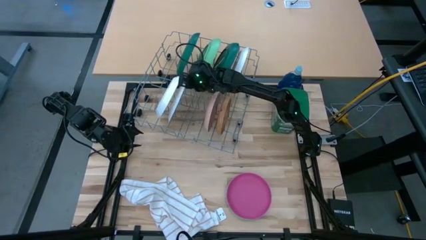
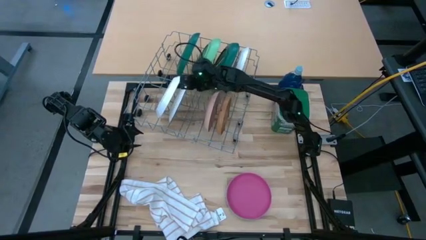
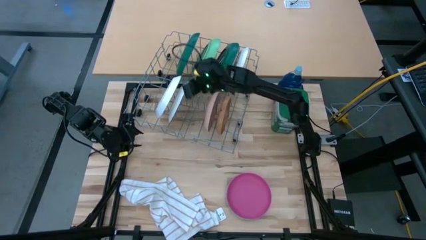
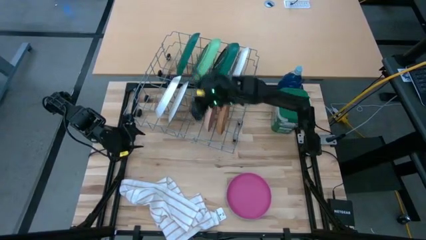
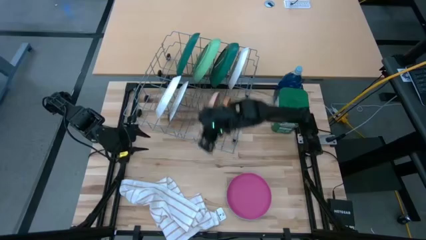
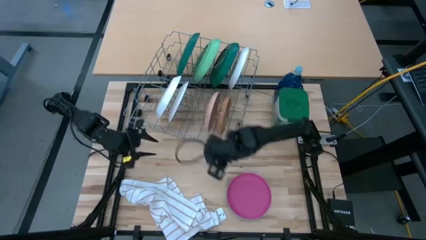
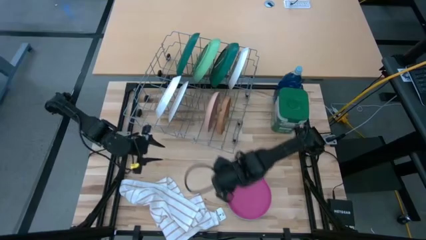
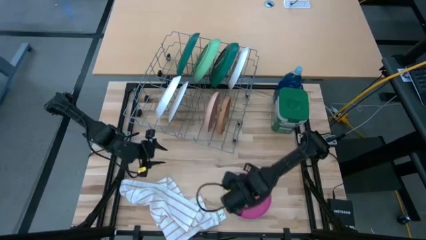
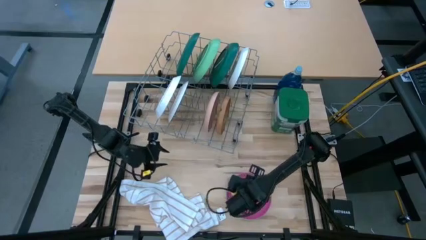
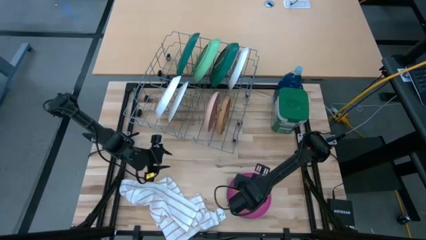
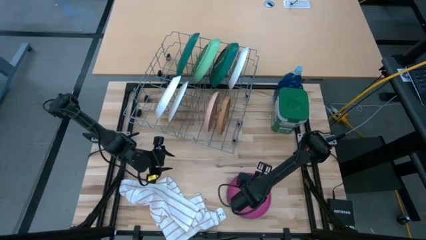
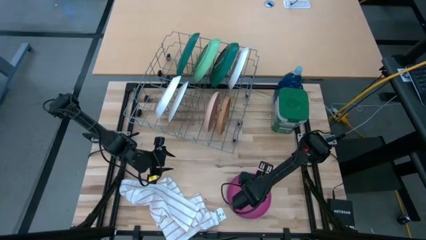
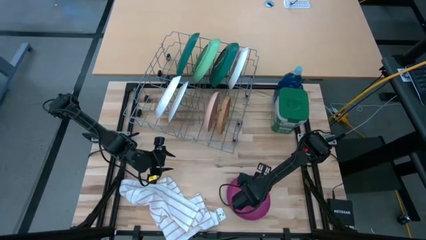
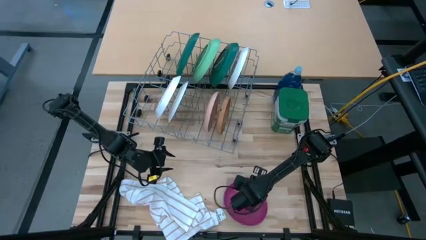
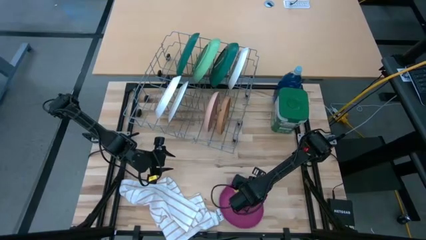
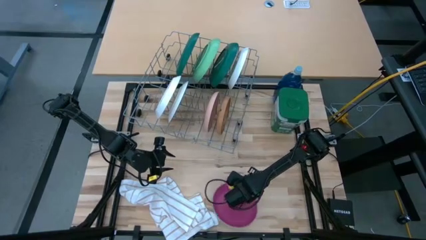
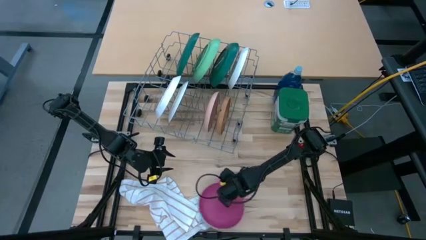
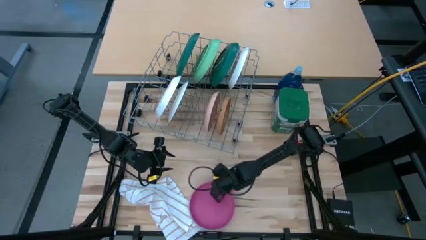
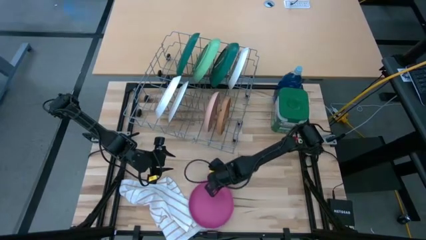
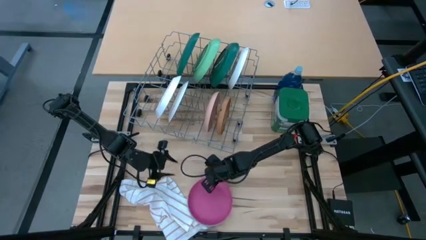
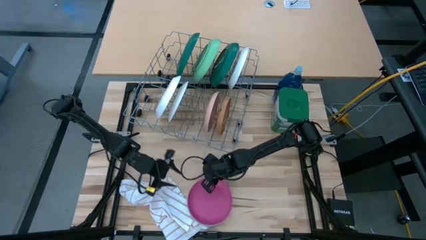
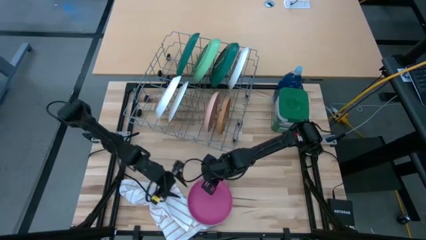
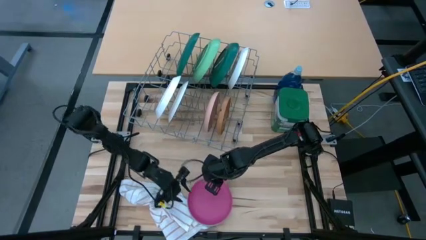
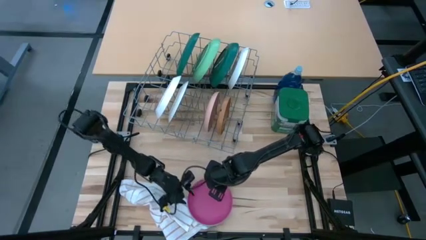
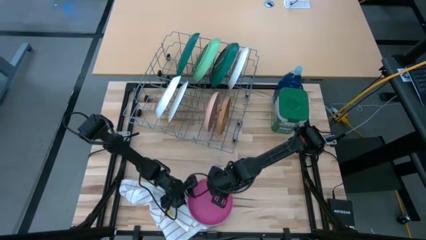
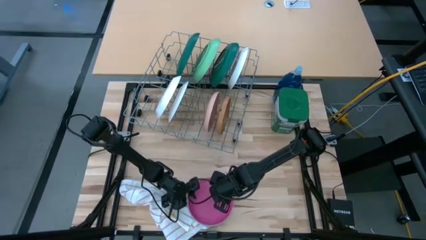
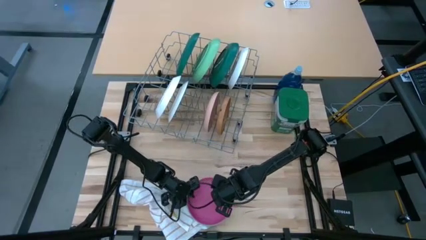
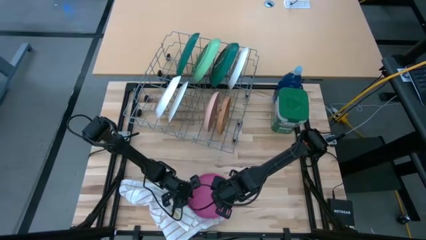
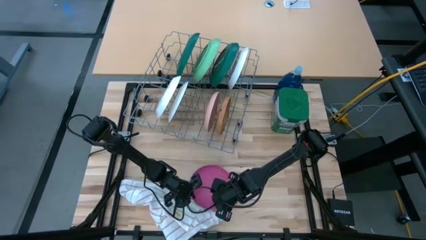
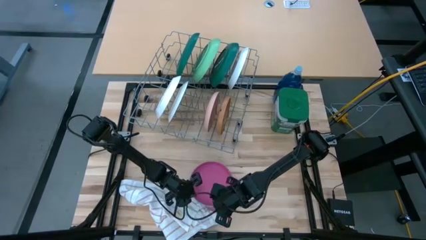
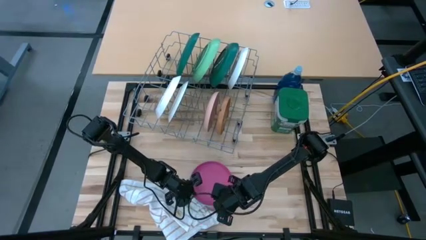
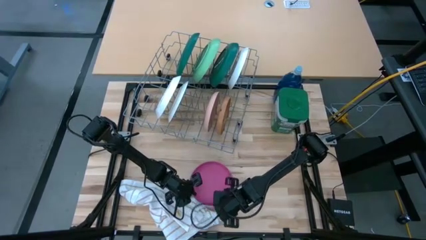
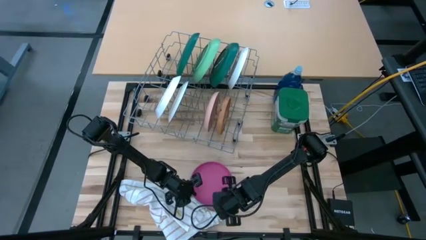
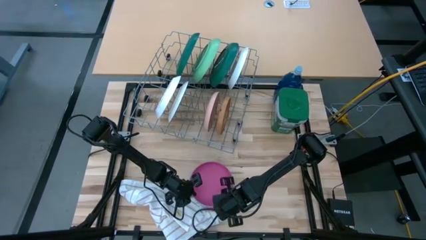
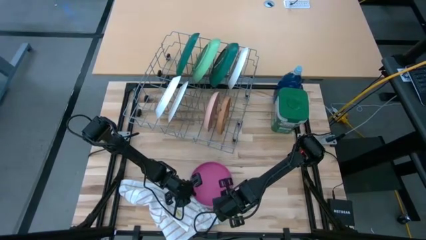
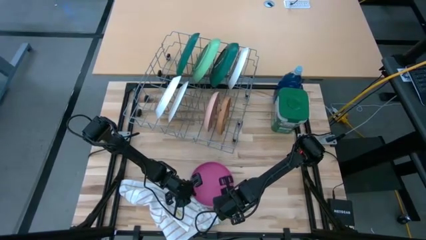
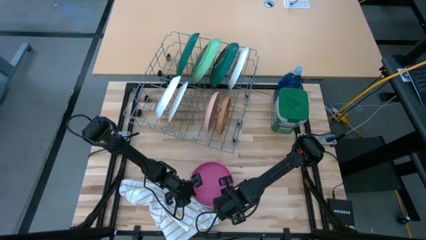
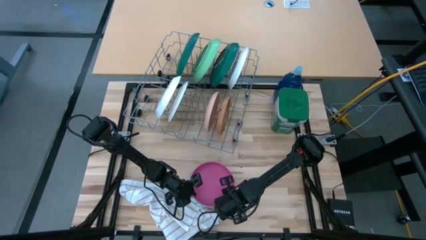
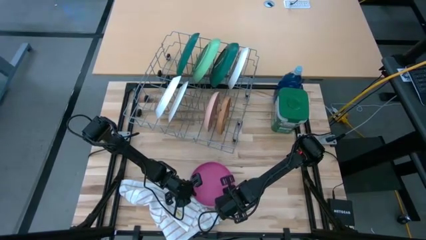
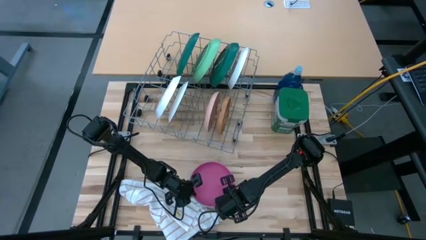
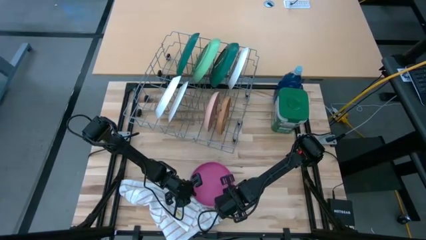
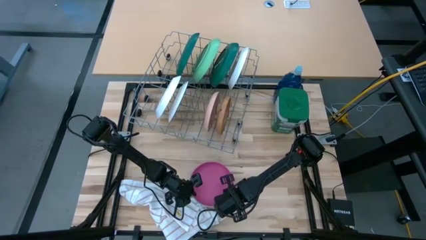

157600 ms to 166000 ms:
Task: Sort dishes
Put the pink plate in the dish rack

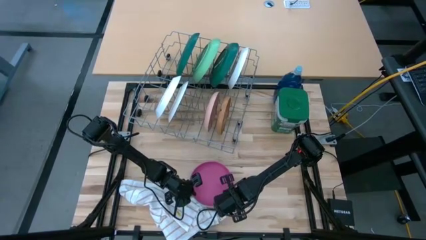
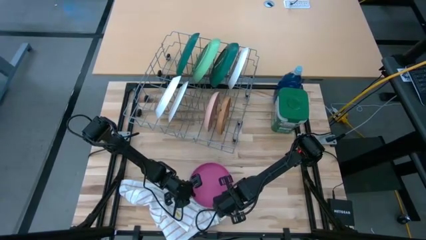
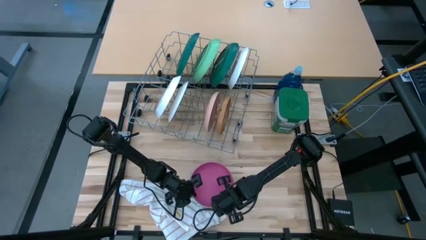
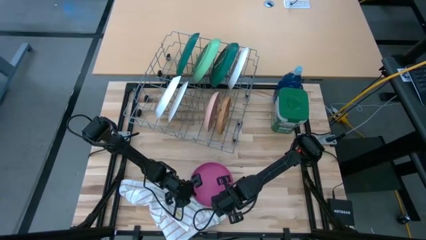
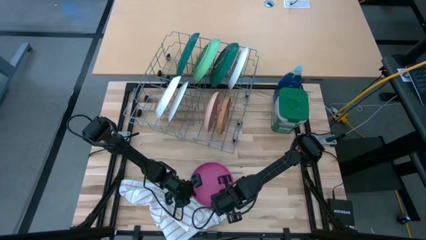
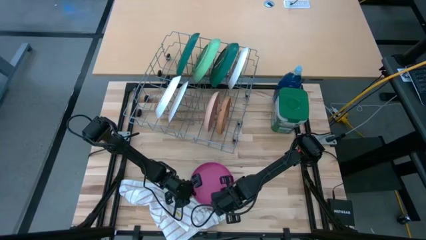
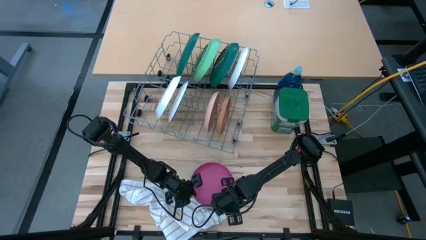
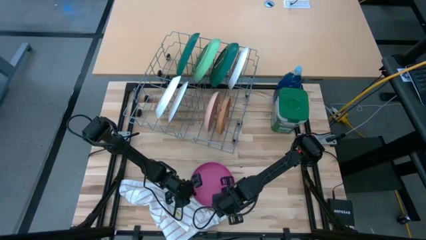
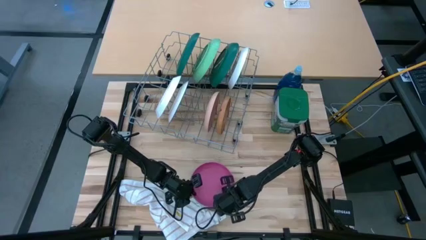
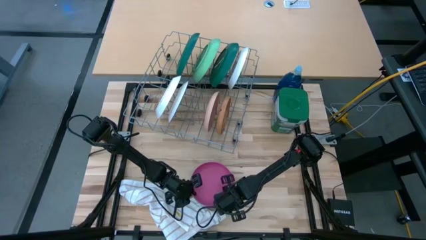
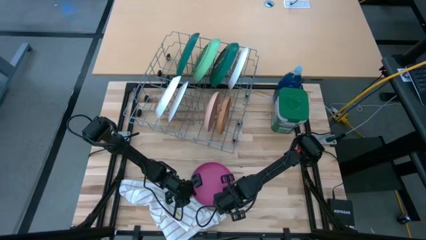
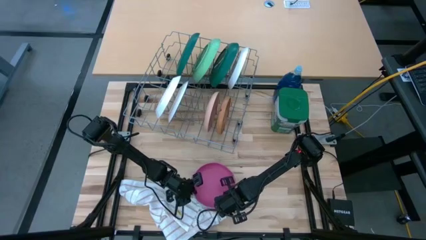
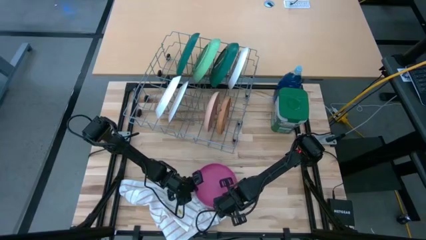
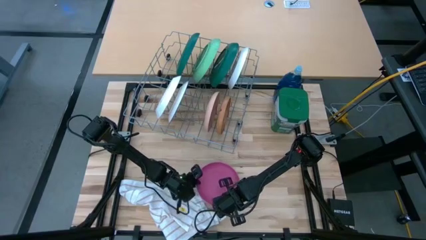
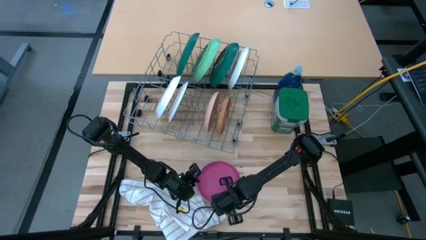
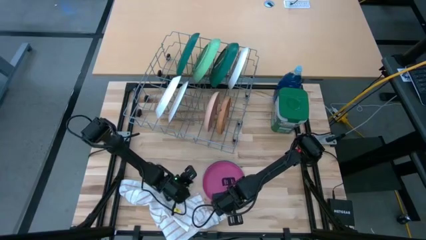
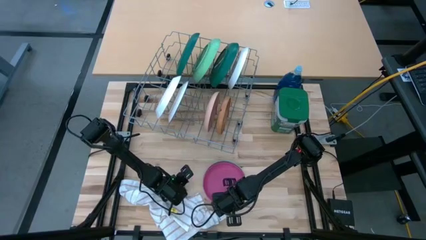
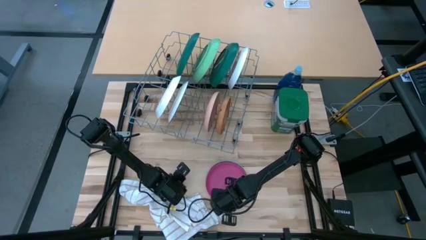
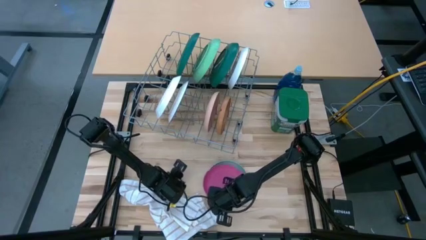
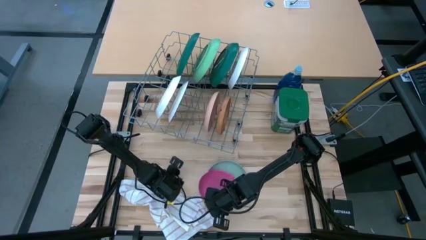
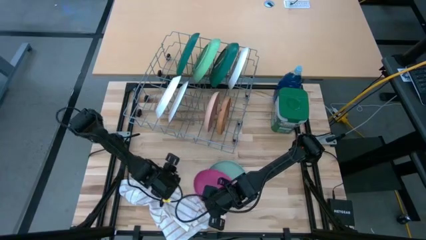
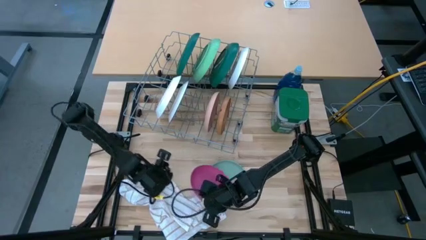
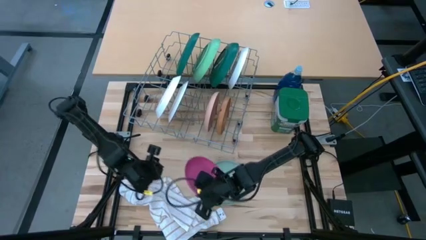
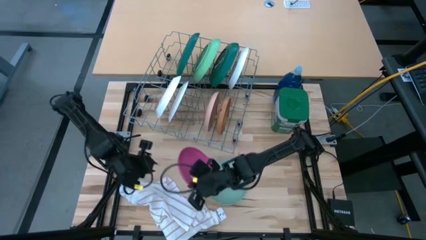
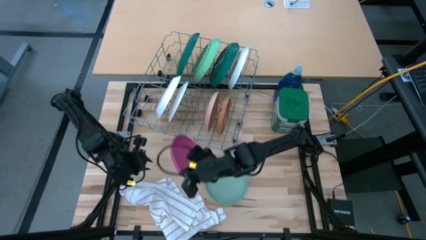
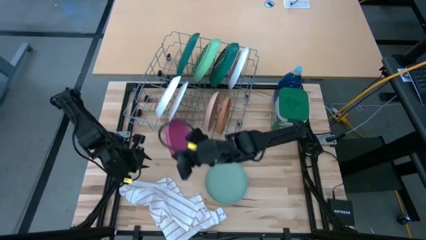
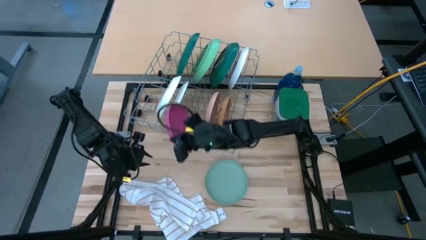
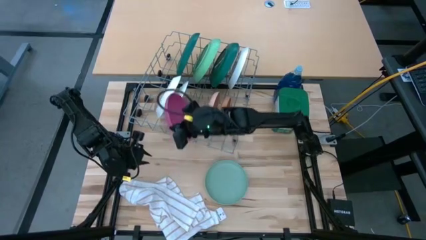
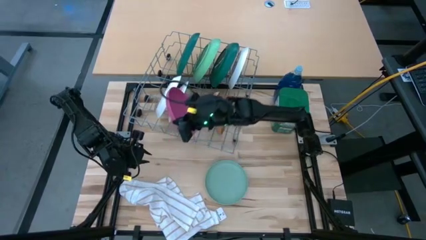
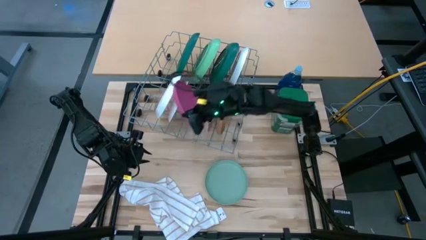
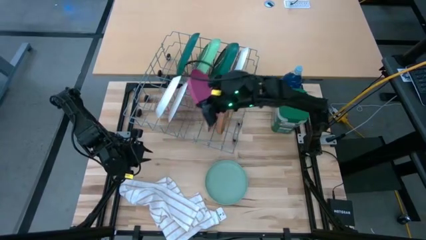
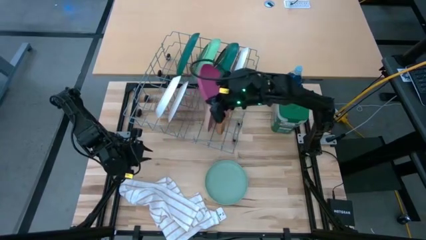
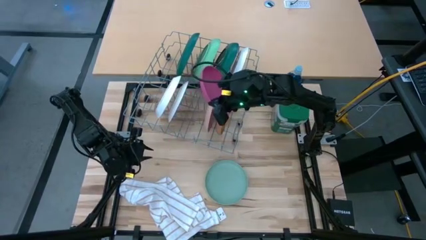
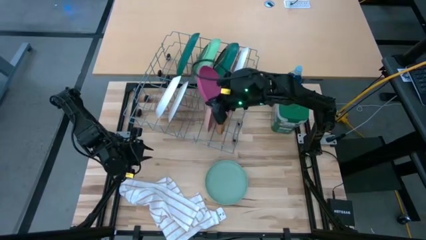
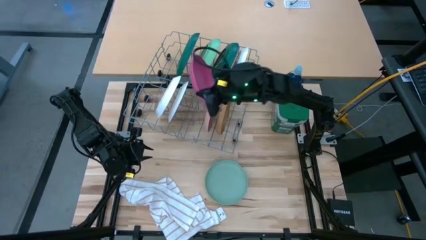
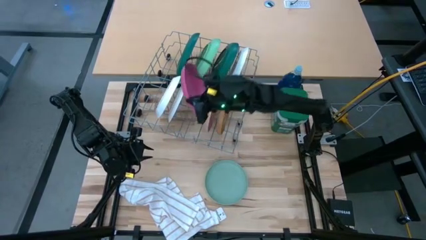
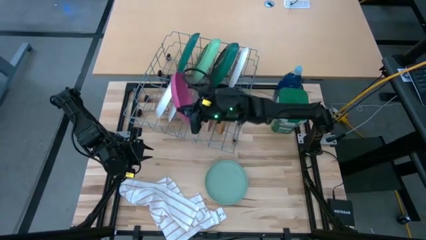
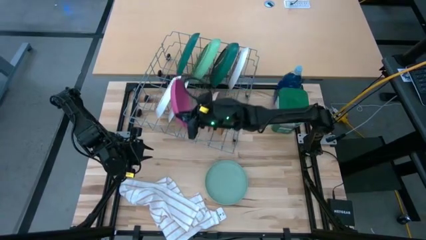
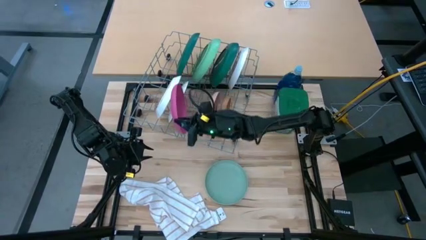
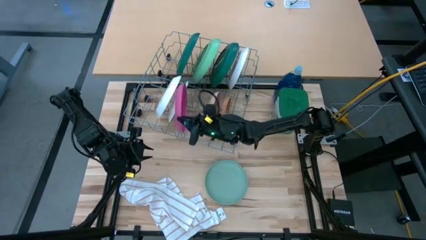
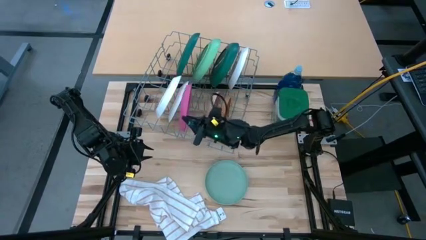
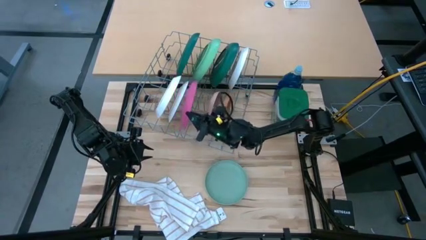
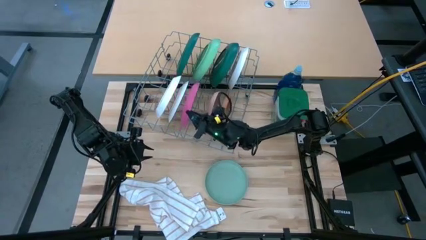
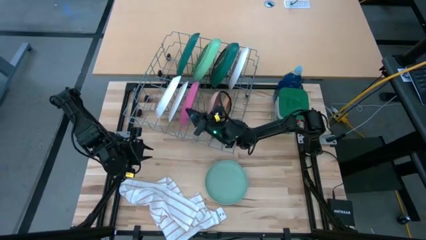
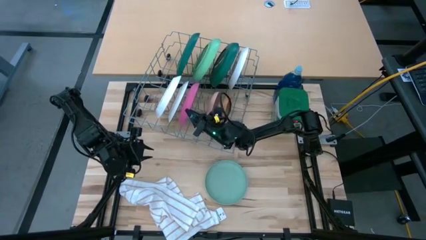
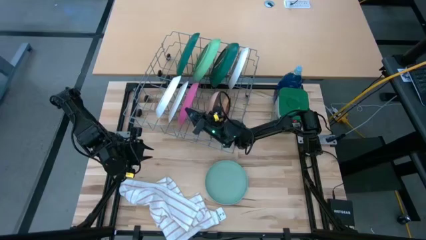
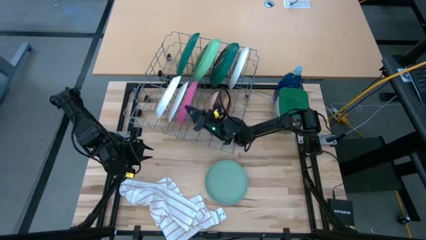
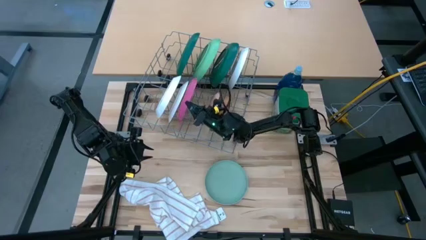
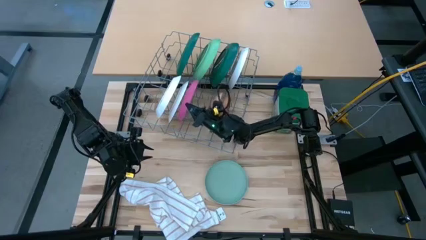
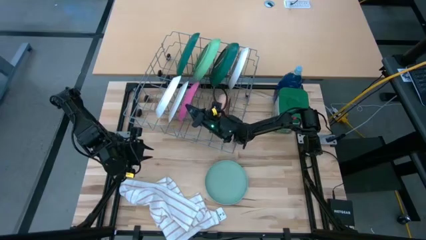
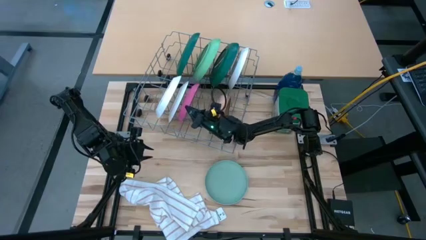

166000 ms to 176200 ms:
Put the pink plate in the dish rack
